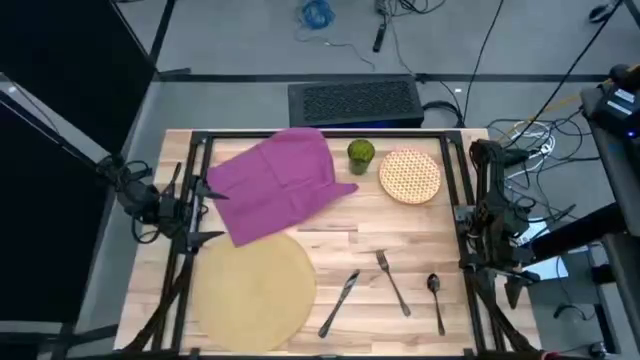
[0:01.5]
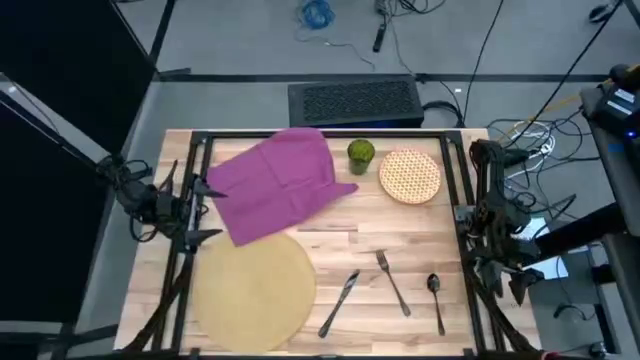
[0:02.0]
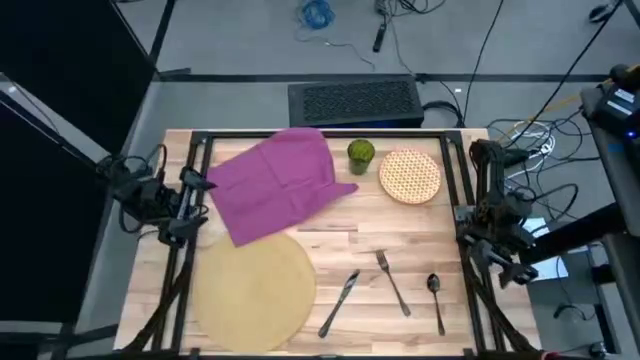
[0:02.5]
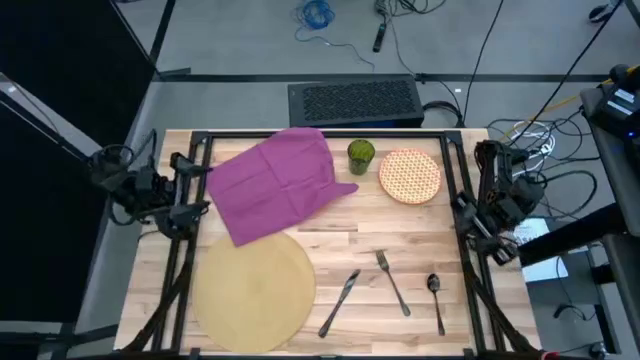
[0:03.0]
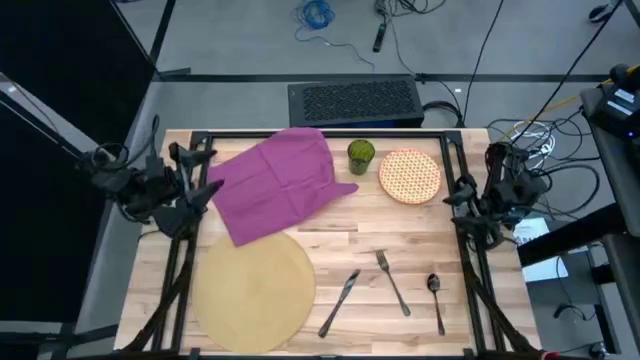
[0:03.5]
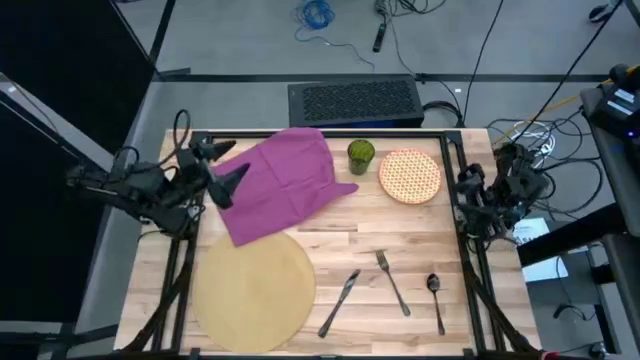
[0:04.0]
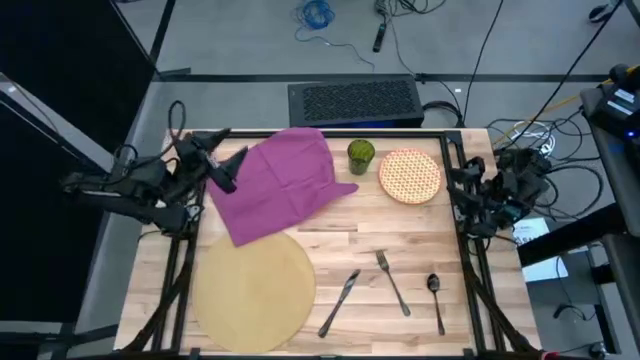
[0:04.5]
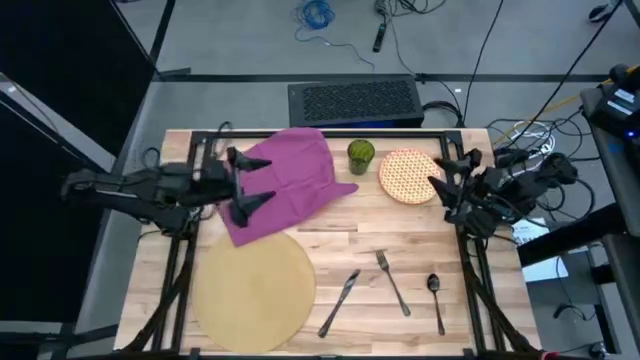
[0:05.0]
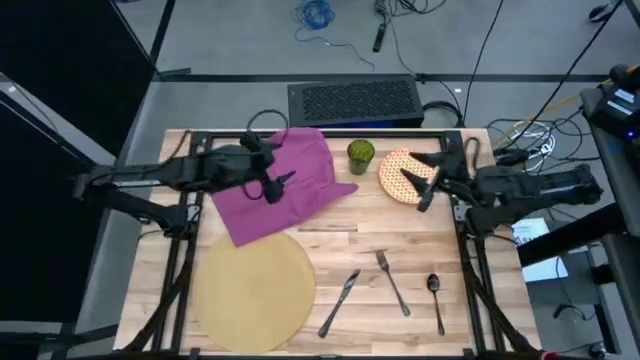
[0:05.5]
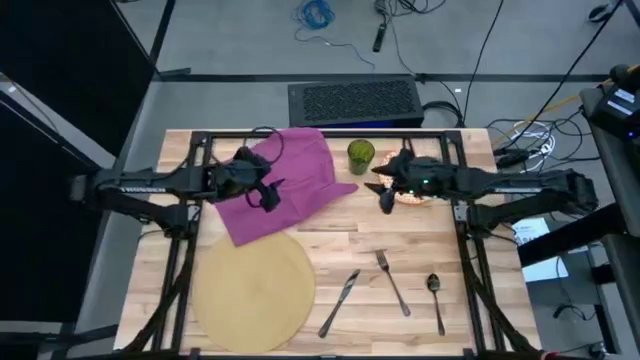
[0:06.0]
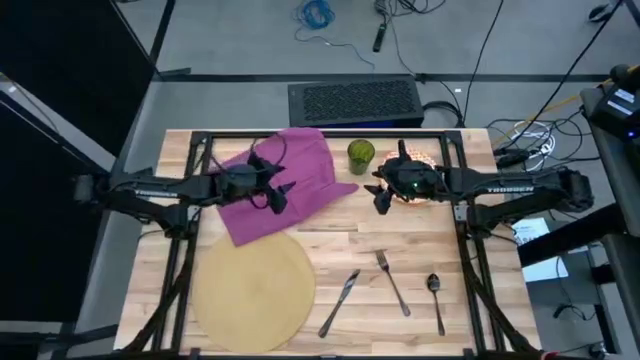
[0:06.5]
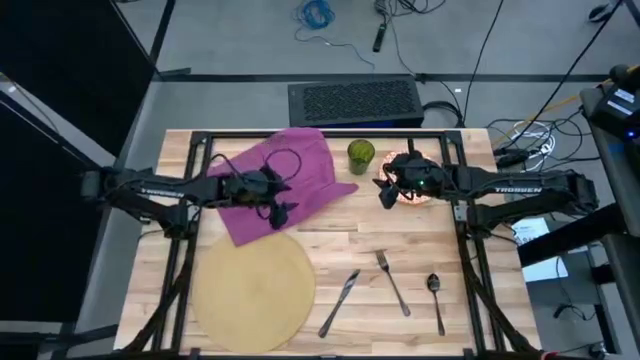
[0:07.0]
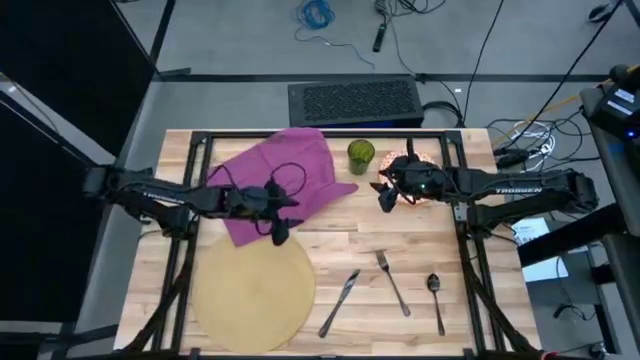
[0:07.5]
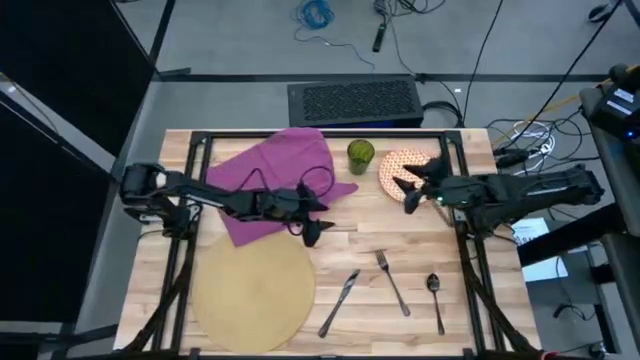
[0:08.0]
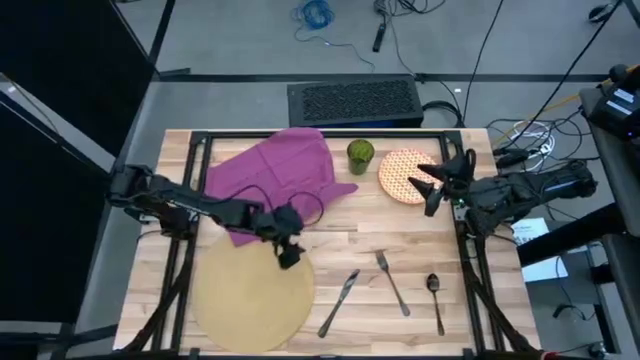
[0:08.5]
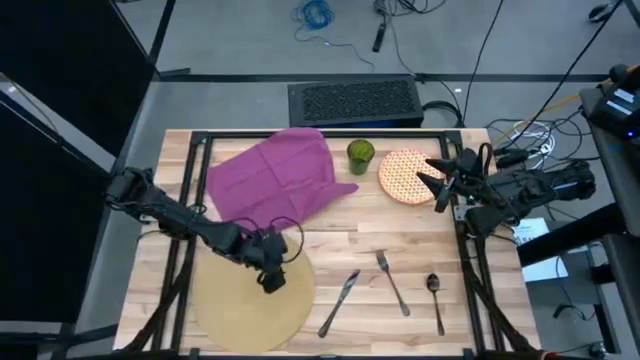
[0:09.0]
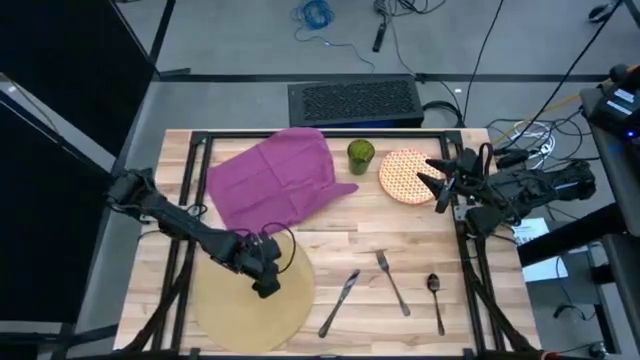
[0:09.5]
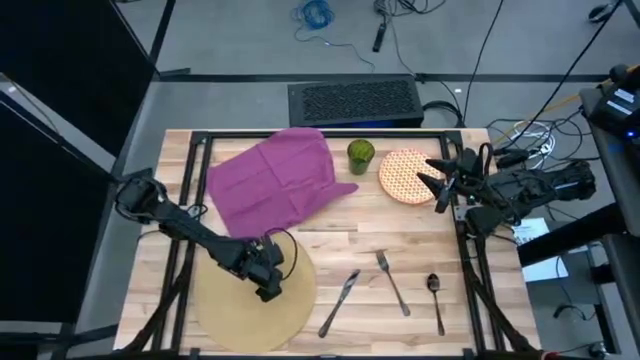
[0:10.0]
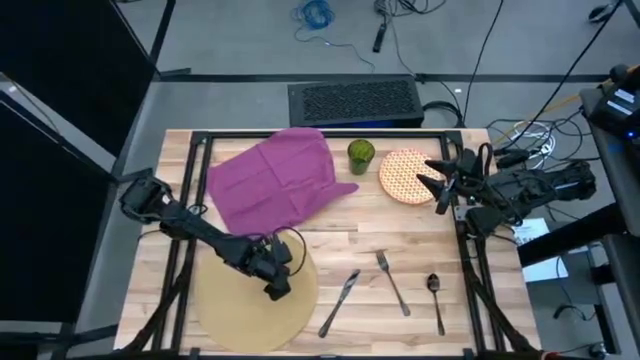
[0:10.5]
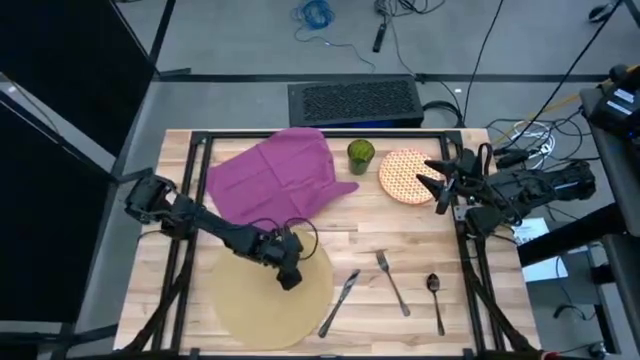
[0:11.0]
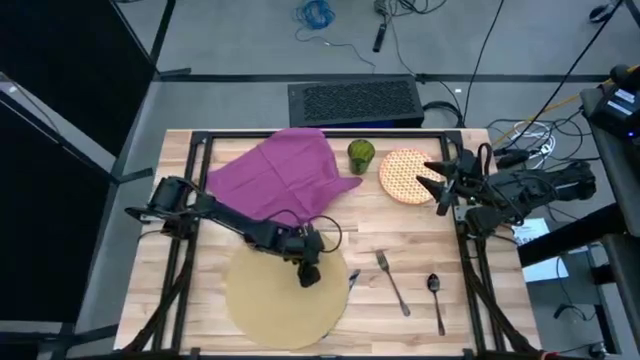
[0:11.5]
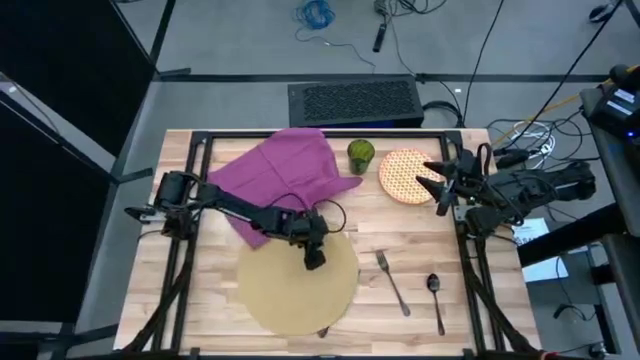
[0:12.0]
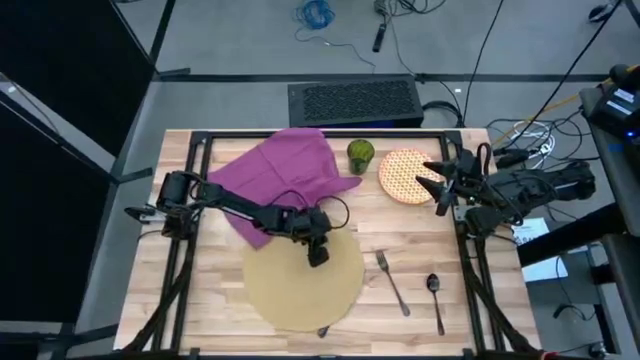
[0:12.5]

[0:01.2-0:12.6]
Task: Set table place
Move the brown placemat to the center of the table

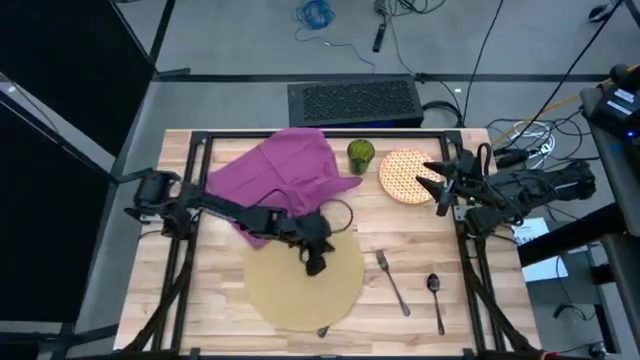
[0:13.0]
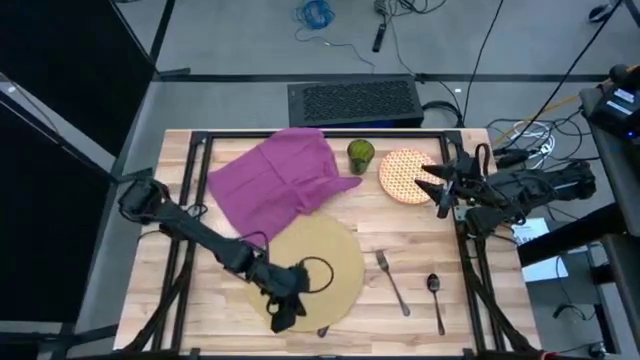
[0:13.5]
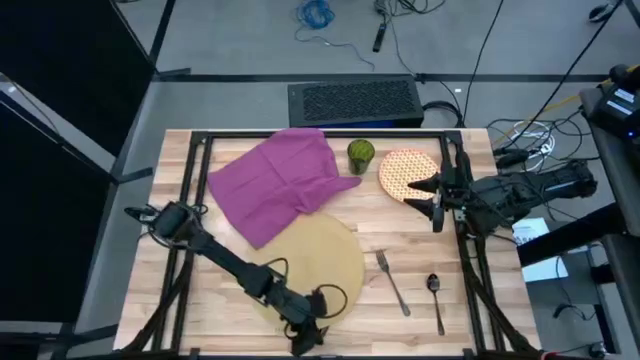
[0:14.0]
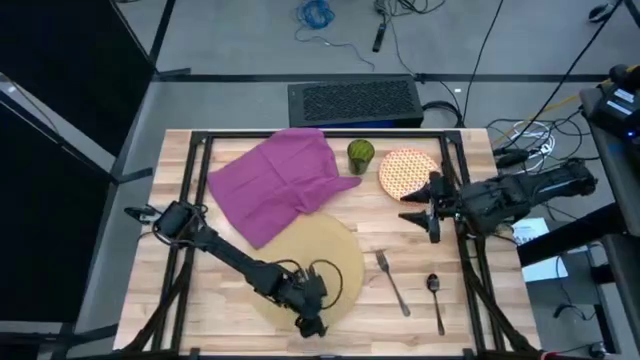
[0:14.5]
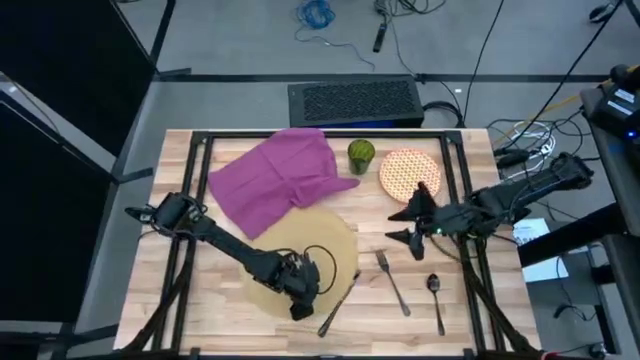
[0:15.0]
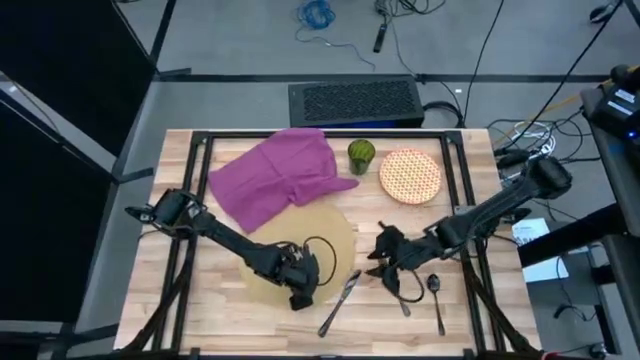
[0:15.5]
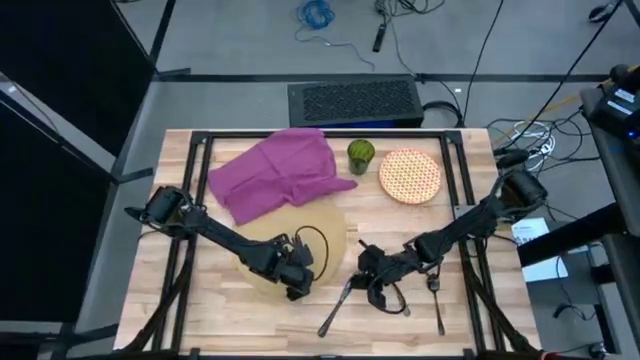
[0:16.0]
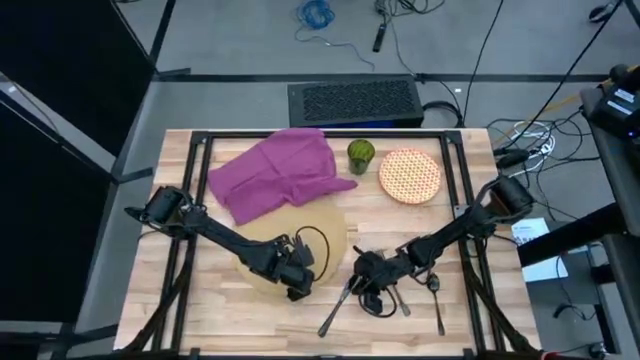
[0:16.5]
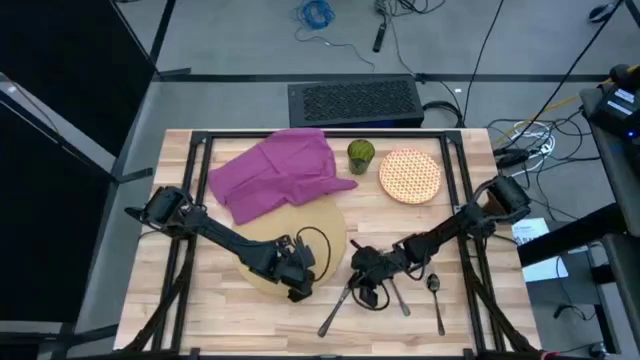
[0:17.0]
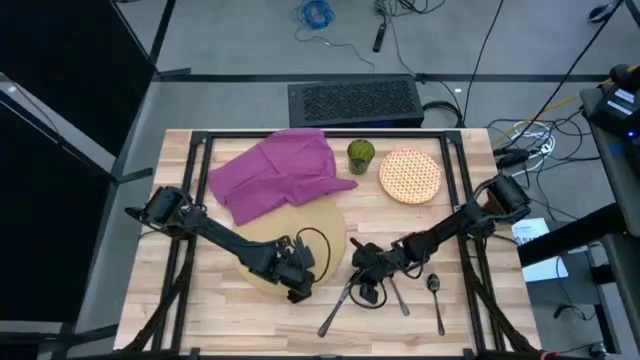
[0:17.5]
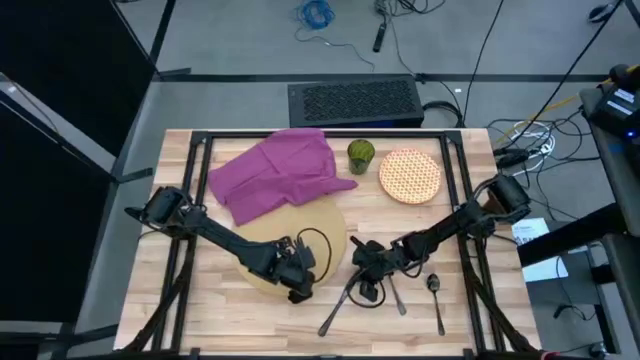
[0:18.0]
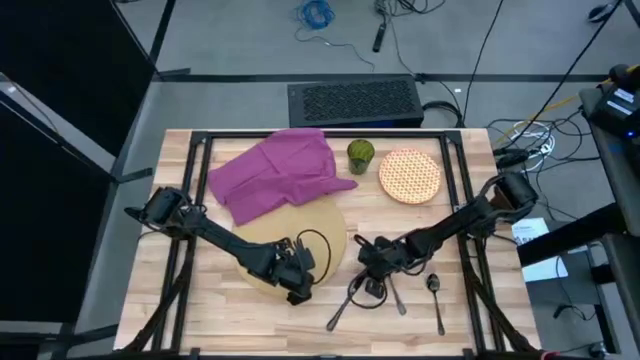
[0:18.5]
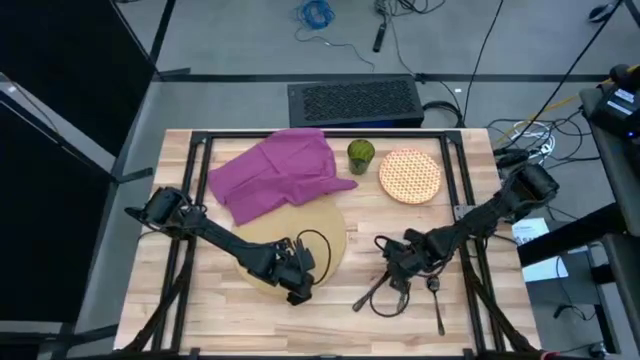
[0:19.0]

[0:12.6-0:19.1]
Adjust the black table knife

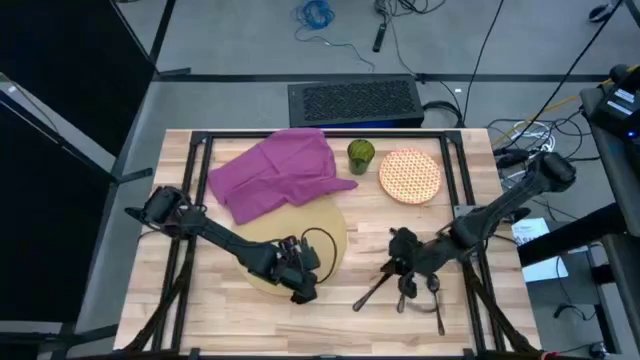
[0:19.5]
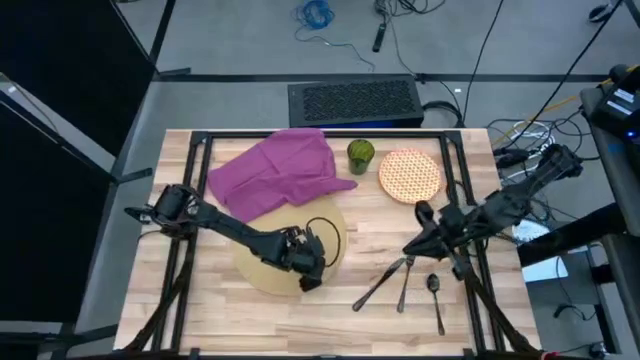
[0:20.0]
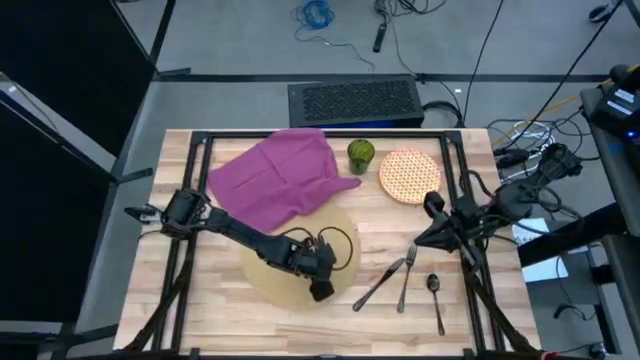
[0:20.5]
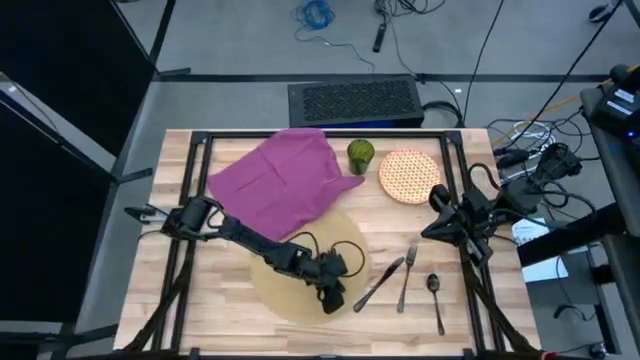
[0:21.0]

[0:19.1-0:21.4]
Adjust the brown placemat
